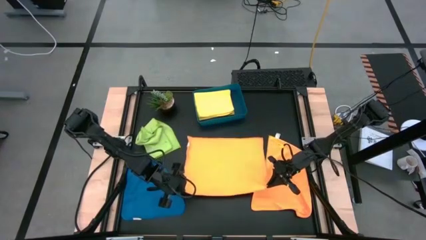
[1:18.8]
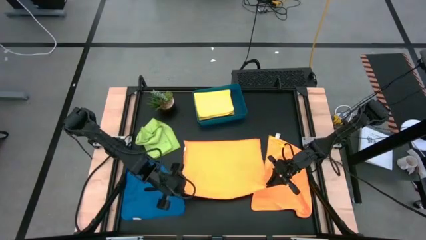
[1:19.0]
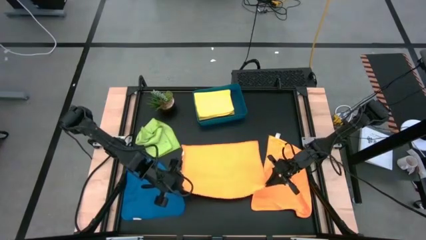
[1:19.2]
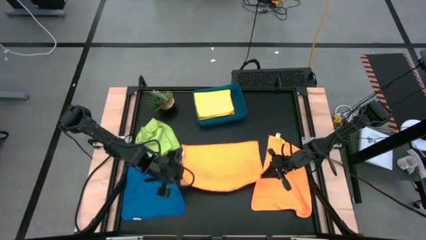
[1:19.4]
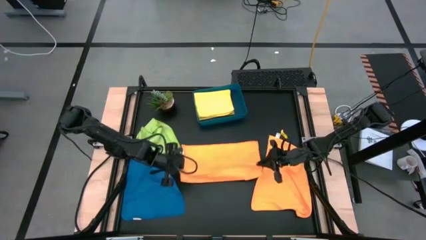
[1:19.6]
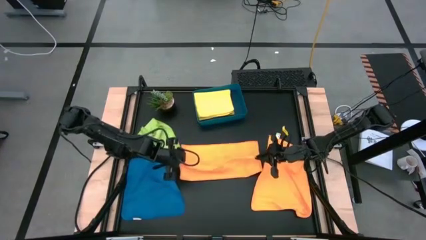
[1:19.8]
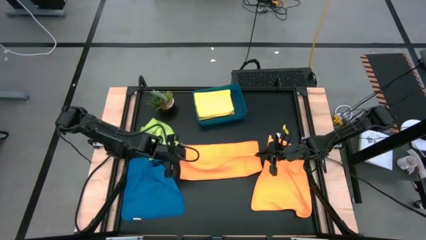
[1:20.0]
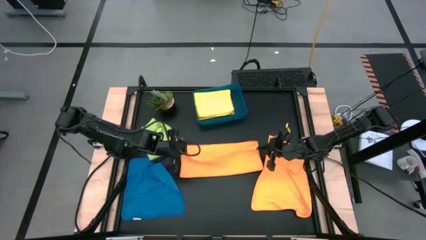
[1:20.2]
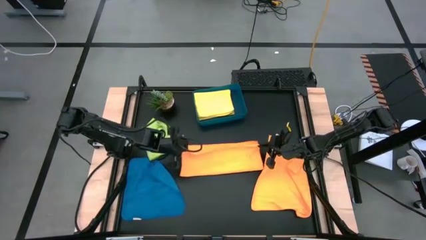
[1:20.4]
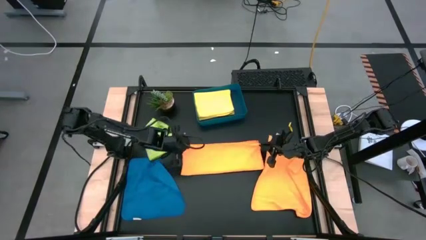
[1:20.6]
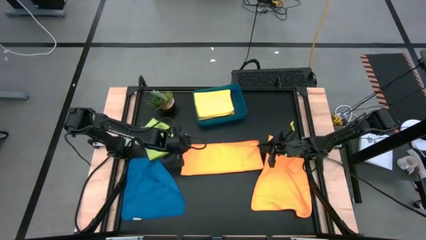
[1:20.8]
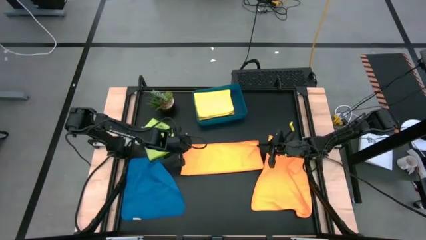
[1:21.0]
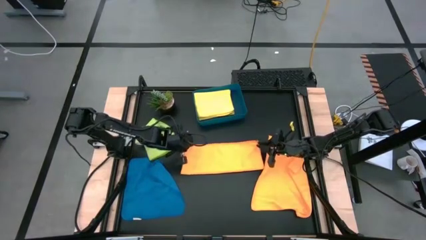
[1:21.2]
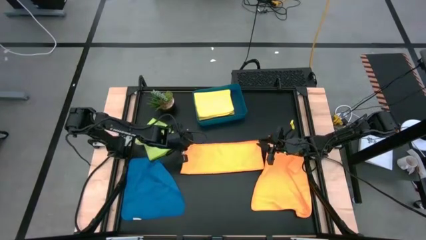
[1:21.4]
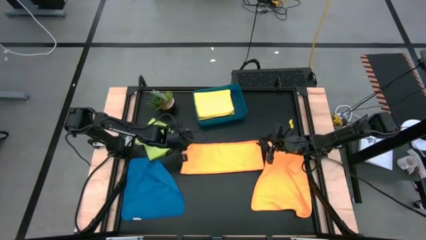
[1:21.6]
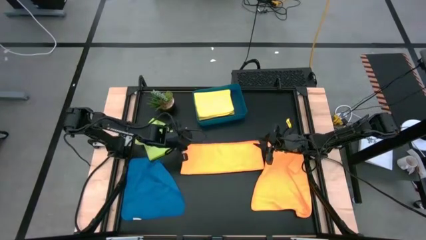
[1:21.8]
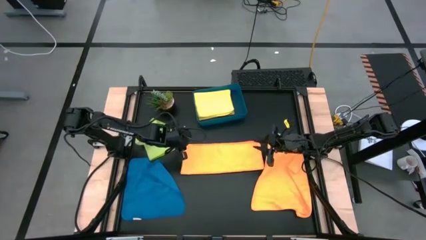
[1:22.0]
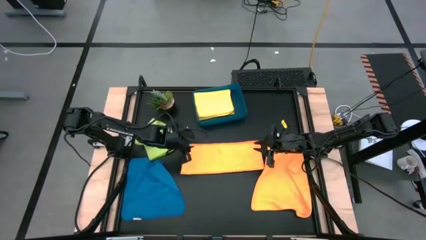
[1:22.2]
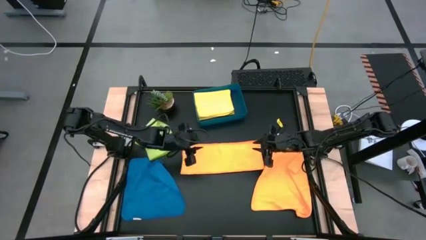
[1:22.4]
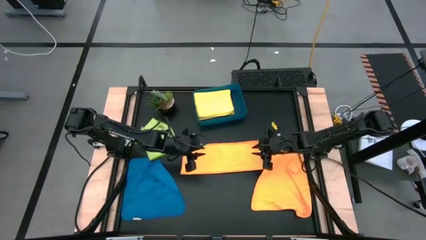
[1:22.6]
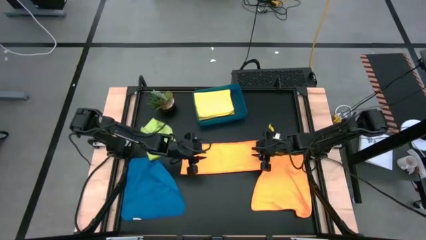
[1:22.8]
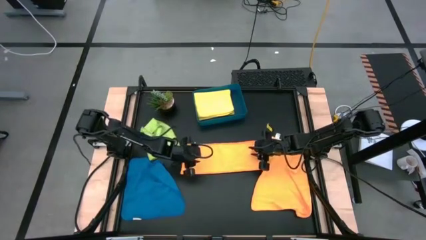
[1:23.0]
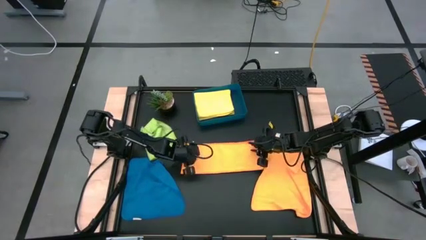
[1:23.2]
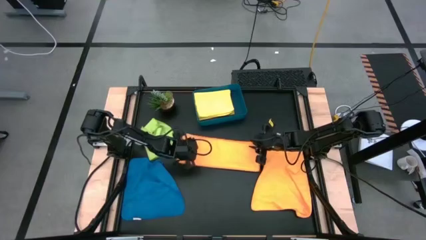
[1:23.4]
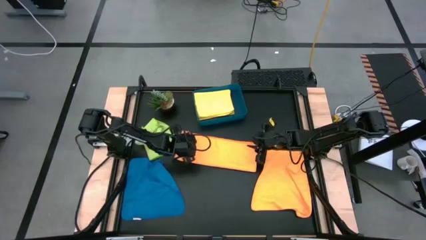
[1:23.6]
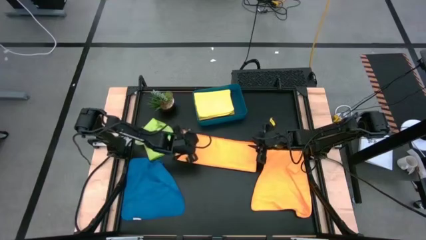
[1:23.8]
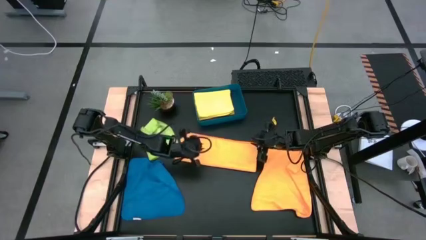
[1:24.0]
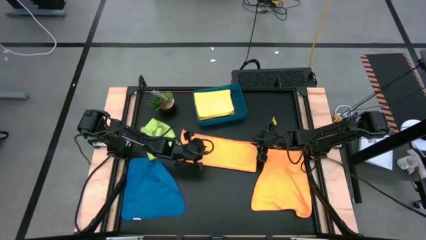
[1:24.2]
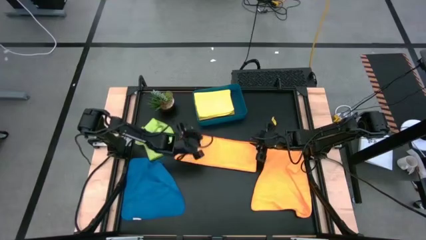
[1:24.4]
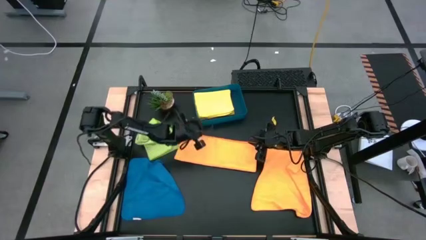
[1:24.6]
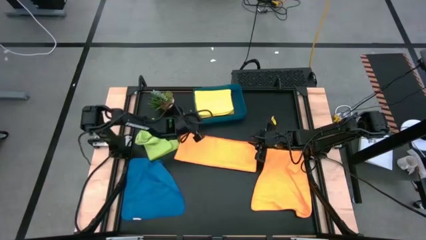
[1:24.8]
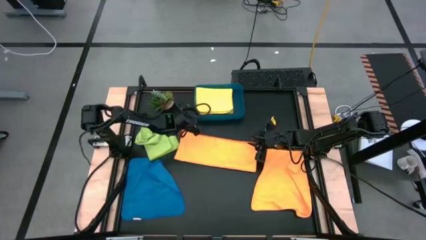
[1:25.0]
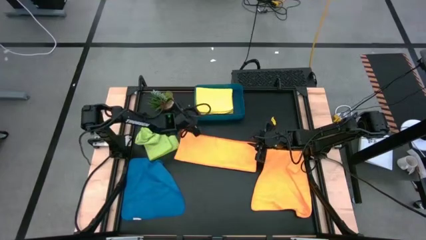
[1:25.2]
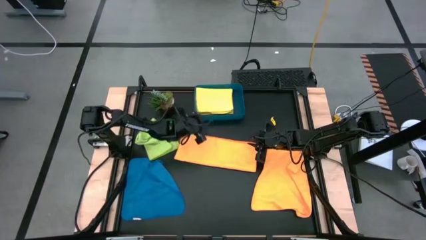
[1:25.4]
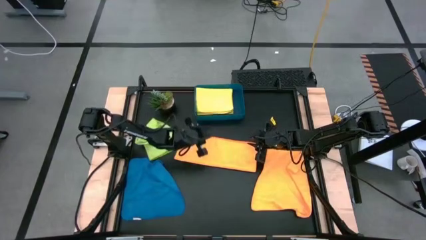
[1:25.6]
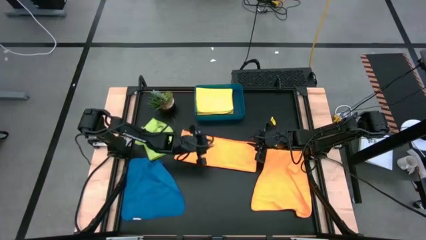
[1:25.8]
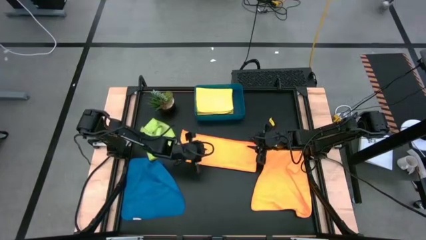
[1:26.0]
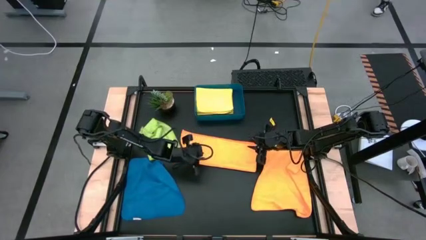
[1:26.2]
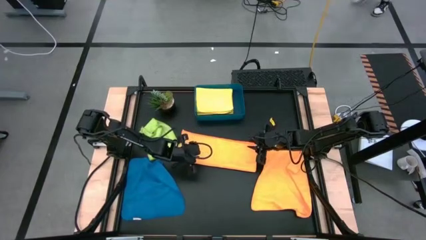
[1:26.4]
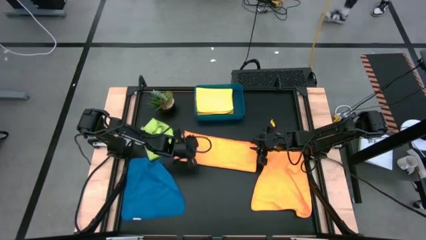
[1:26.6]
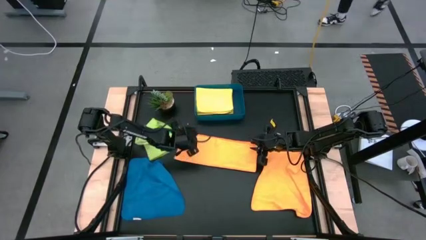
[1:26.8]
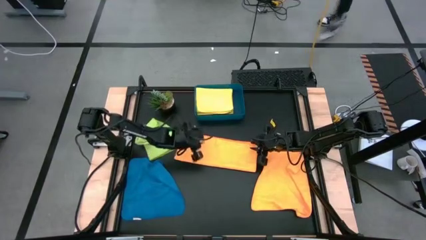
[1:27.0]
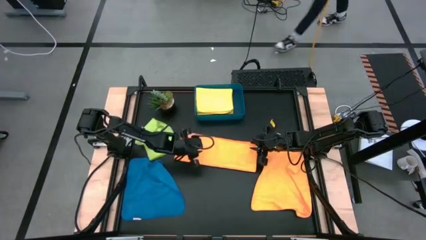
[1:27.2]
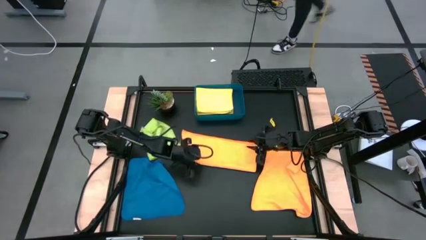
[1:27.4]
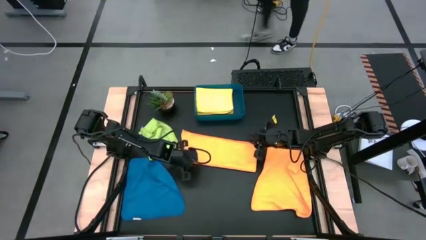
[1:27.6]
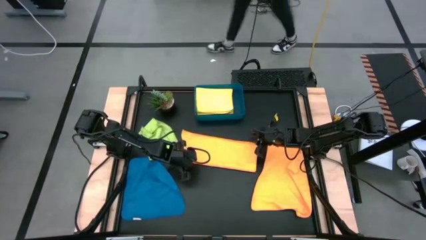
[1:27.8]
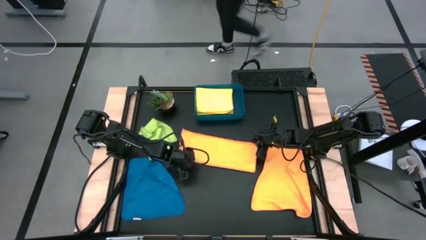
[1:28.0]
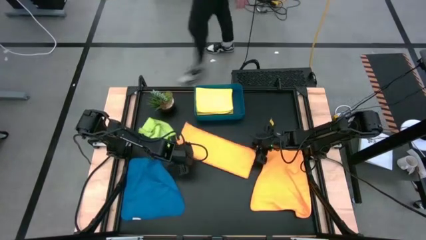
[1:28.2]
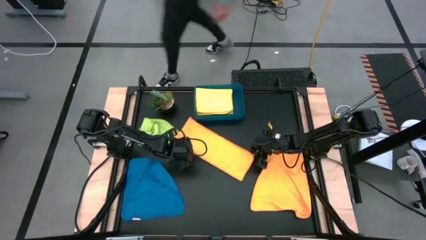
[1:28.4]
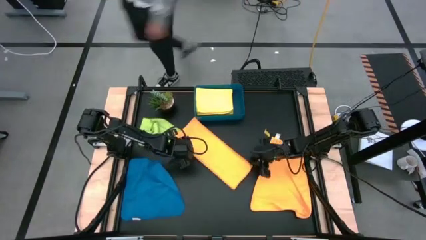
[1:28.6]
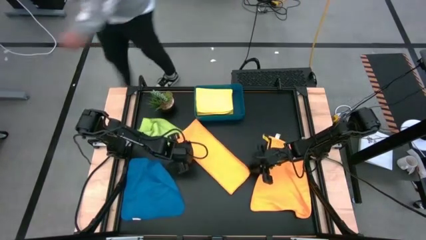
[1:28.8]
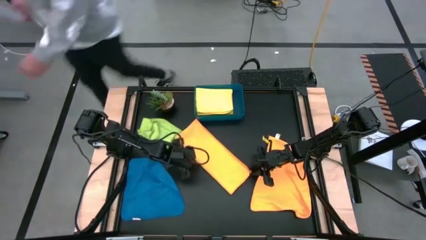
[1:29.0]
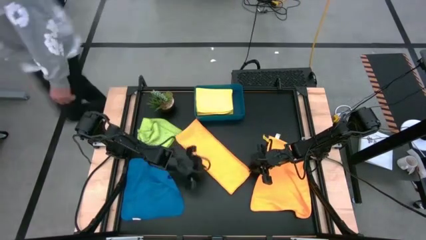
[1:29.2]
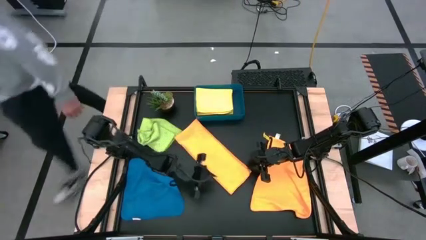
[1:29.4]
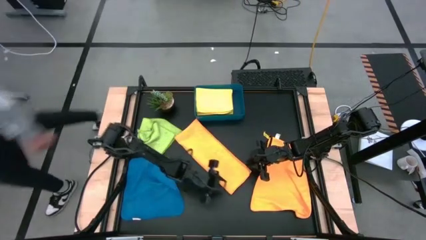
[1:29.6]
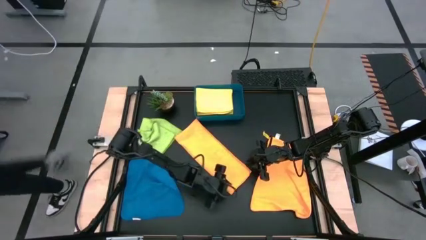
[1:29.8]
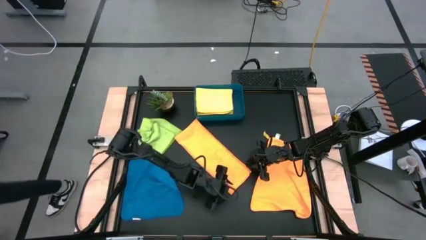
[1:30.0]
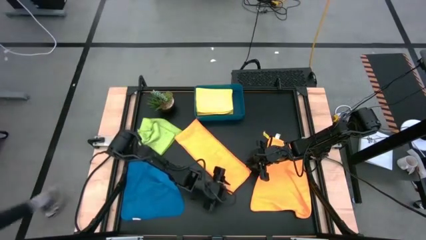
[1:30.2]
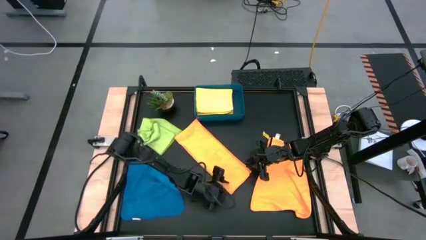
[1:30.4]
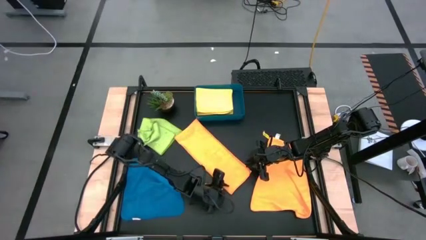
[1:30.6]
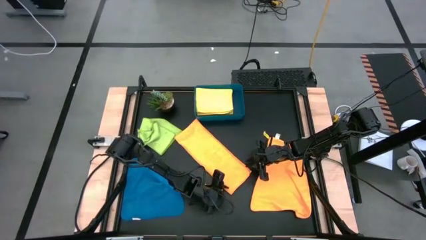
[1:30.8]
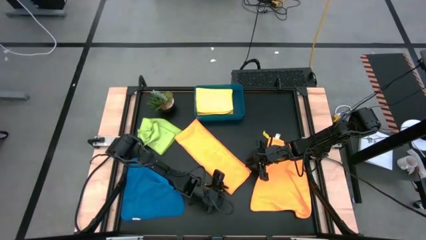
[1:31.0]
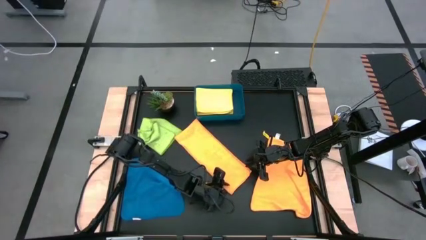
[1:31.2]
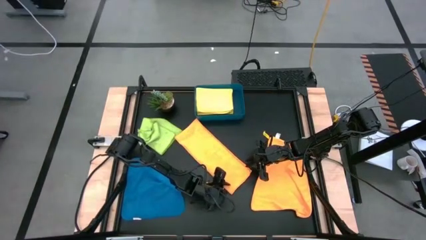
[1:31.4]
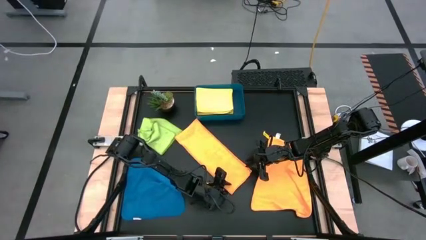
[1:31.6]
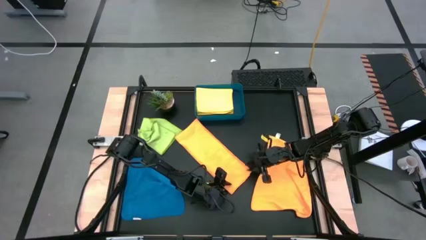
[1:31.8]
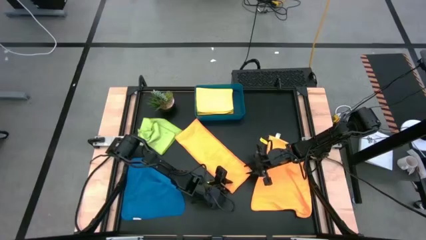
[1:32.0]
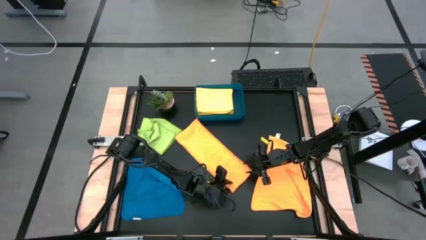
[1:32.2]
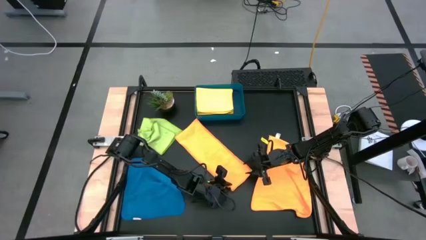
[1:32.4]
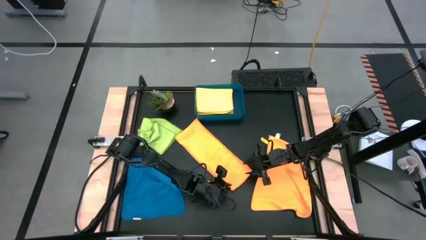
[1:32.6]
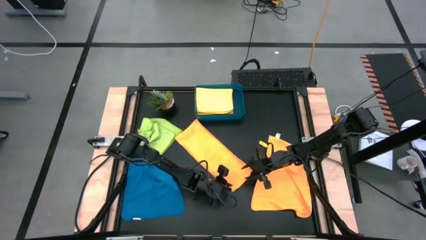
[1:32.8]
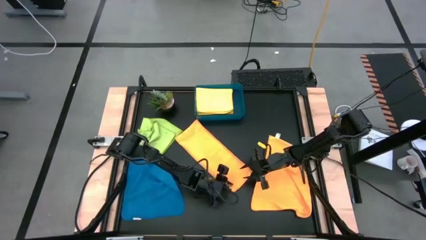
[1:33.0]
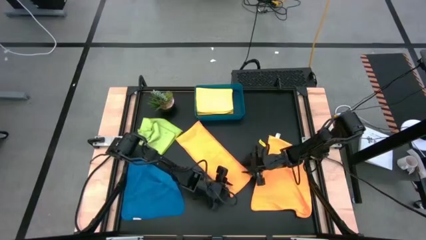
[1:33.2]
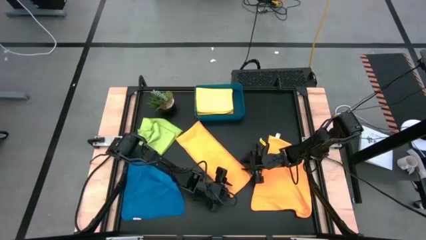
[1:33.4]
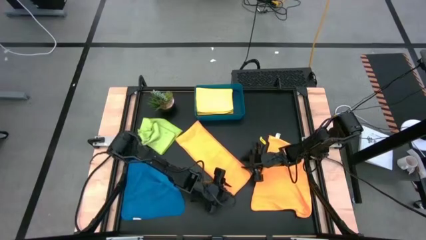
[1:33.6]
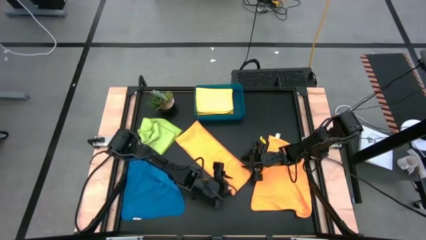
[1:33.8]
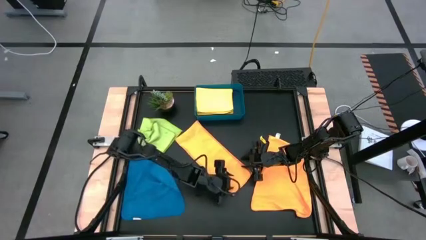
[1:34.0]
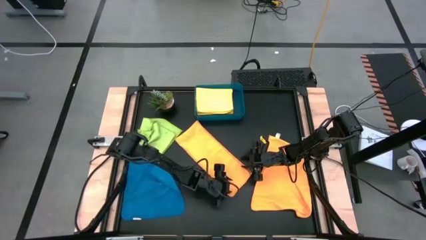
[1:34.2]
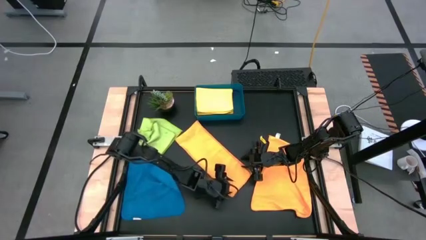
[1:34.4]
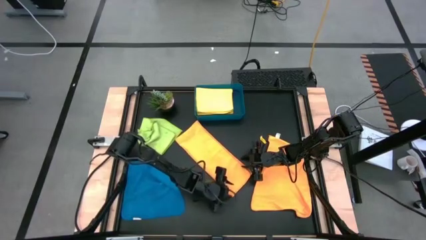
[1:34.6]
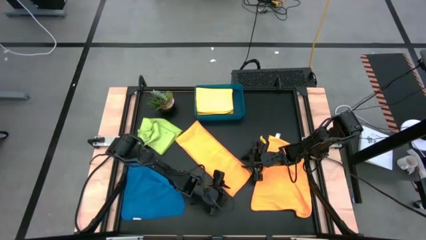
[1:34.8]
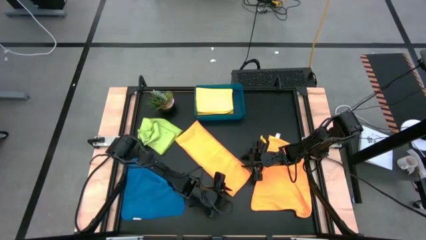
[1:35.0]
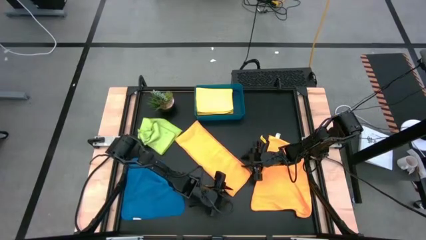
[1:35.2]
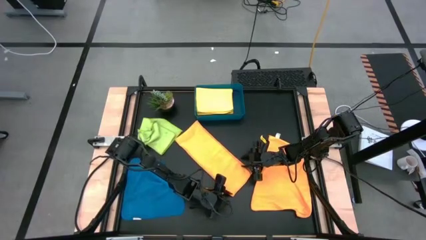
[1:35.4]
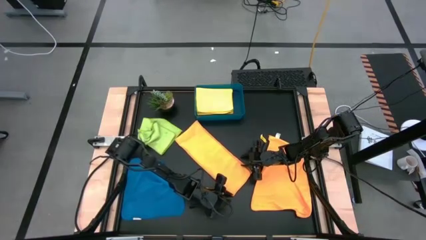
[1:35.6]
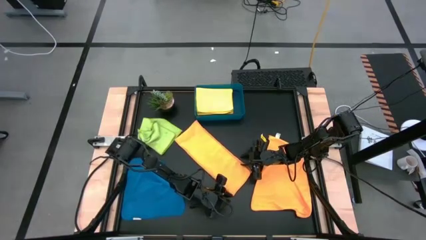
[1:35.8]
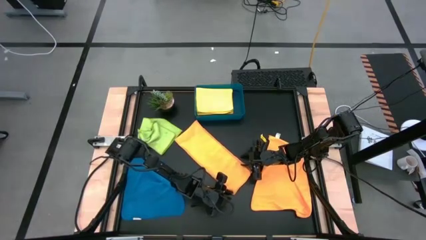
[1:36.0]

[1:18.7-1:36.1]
Task: Fold microfiber towels
Fold the top orange microfiber cloth
